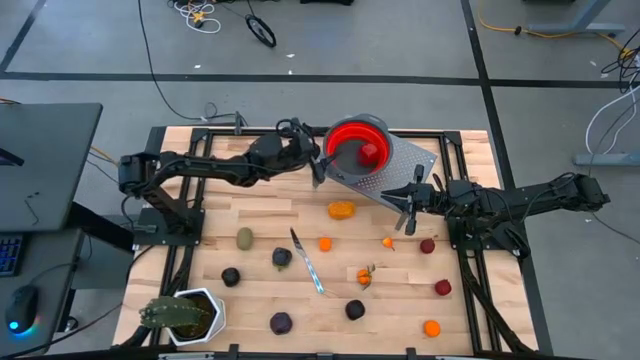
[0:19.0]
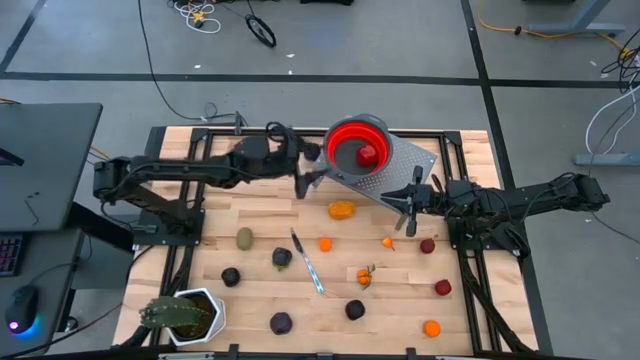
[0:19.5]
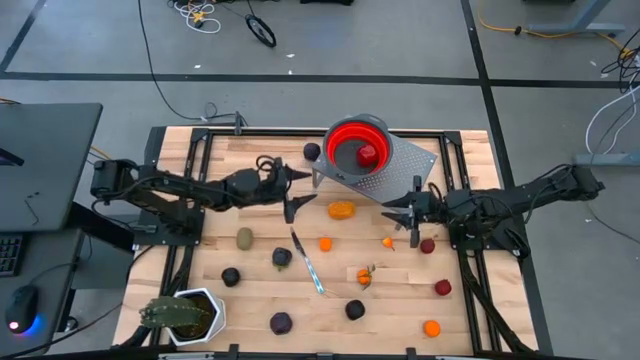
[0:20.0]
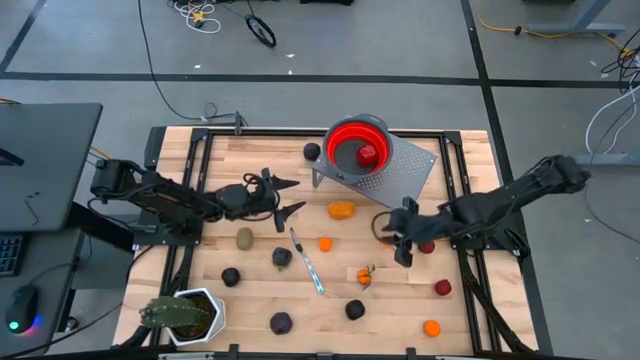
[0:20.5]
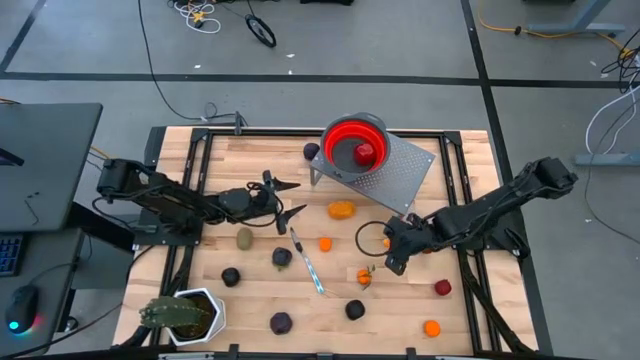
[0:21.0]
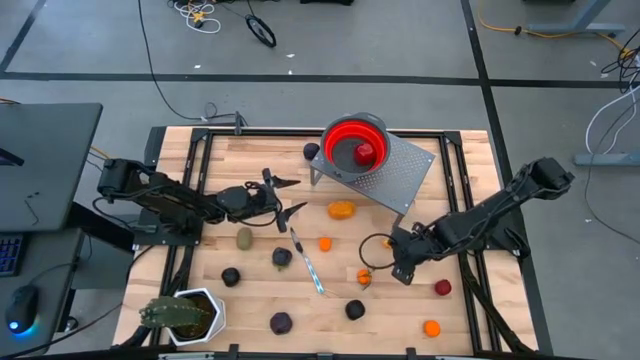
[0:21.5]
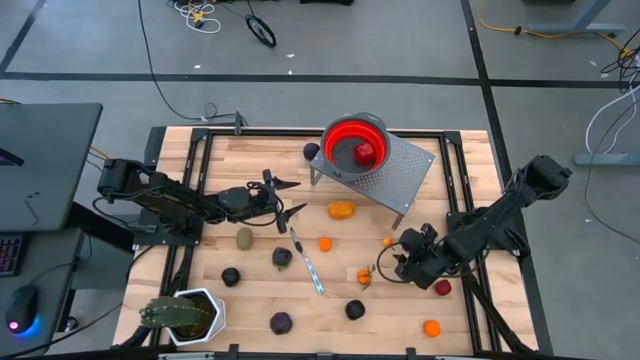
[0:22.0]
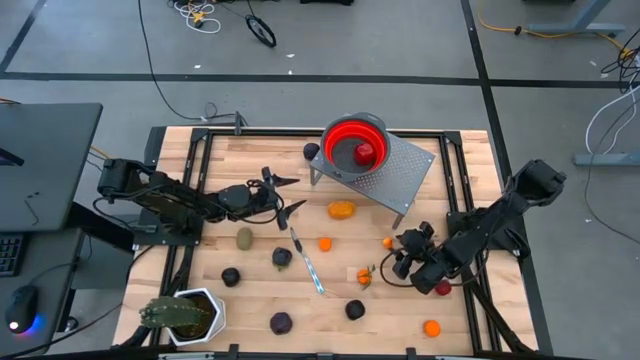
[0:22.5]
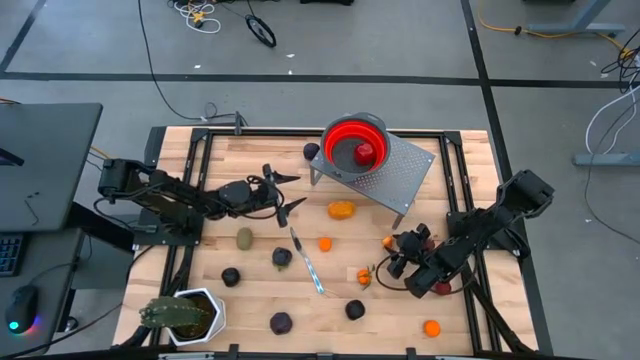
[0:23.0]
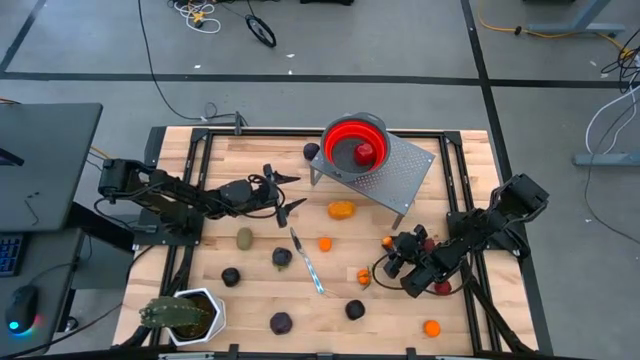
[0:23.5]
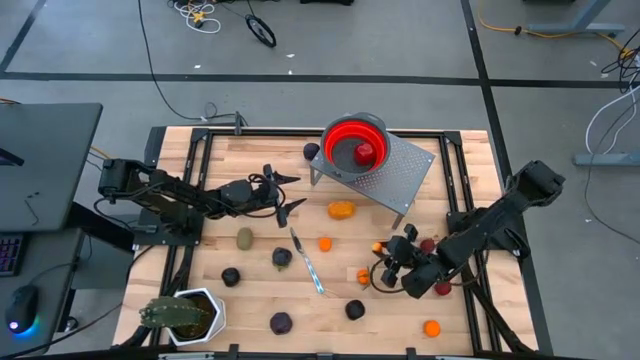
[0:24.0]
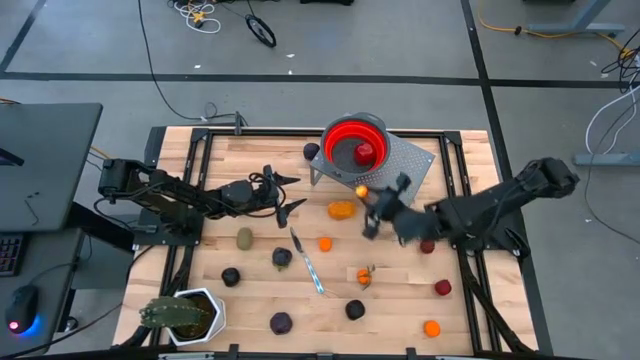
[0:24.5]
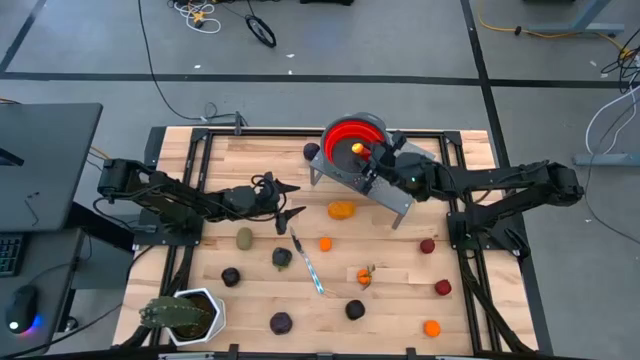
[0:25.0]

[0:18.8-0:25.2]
Task: Pick & Place Fruit
Put the peach into the red strainer bowl

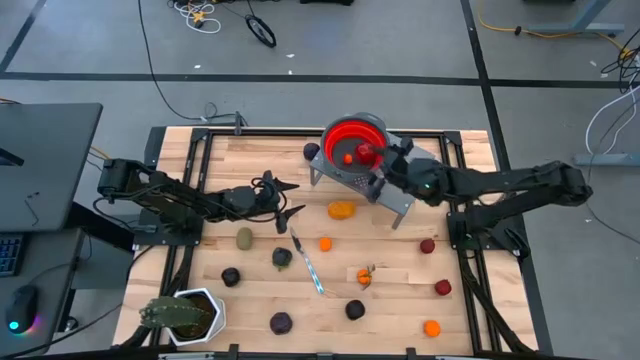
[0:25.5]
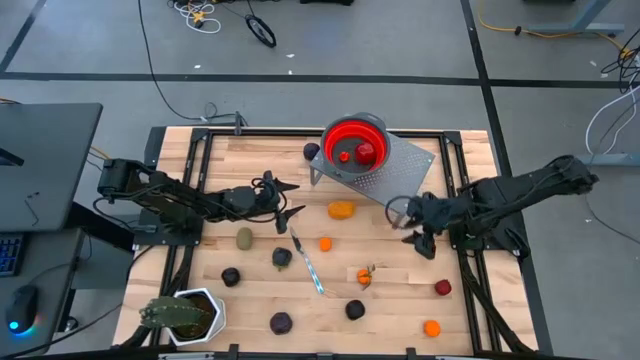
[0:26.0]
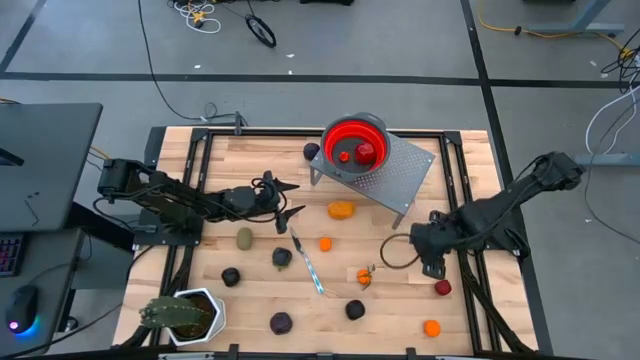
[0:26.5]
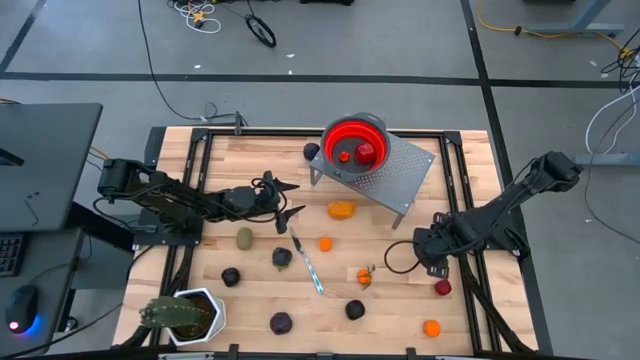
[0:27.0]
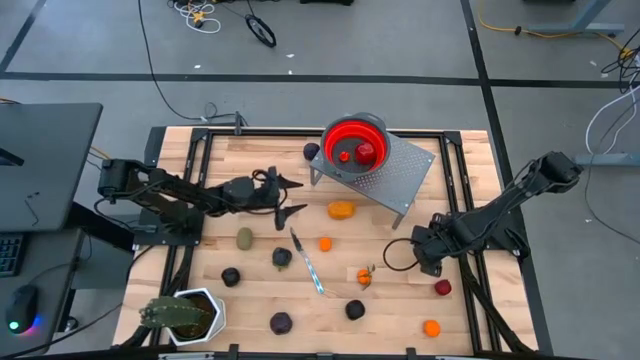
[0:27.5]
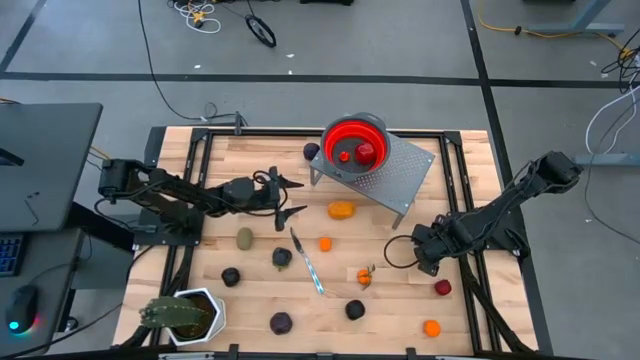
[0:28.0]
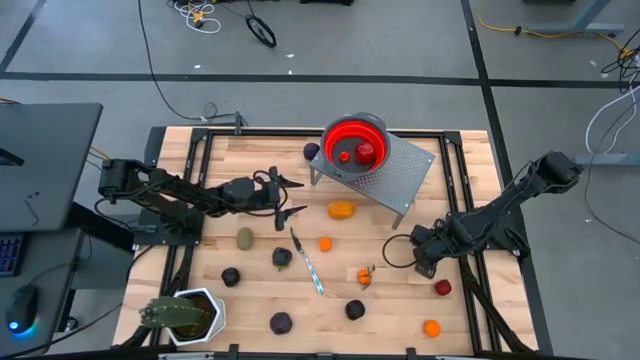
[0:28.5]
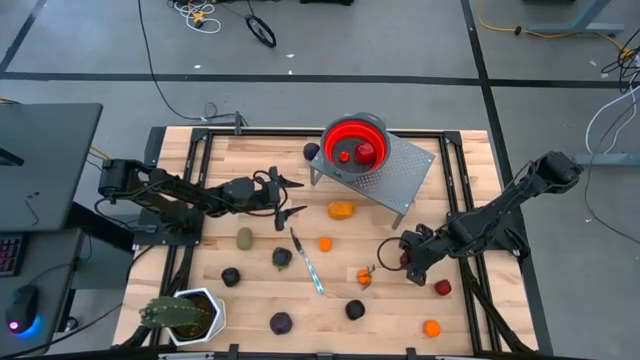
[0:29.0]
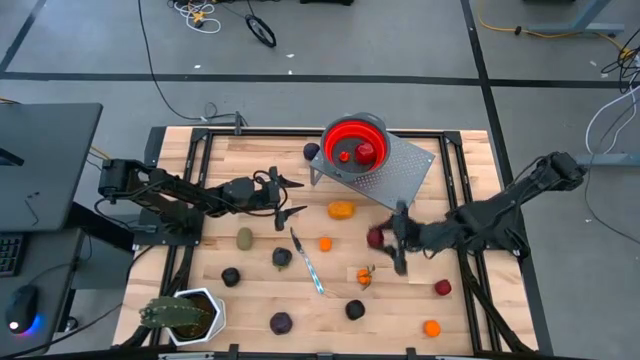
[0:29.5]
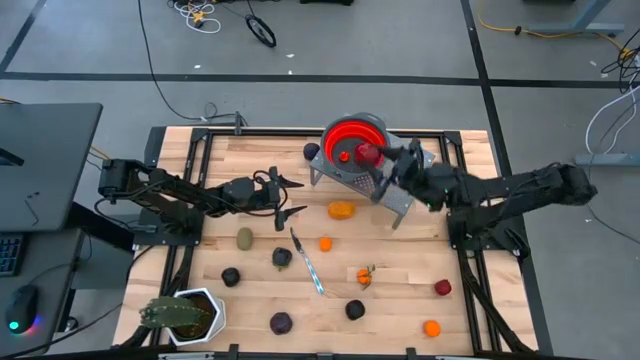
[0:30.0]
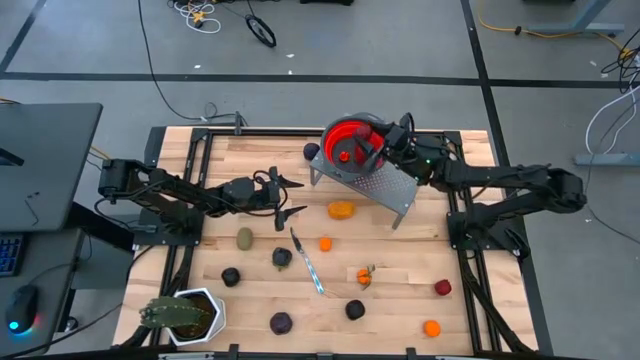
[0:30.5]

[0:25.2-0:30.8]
Put the top pomegranate into the red strainer bowl

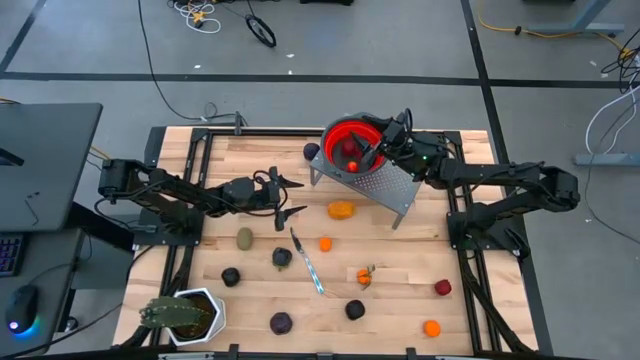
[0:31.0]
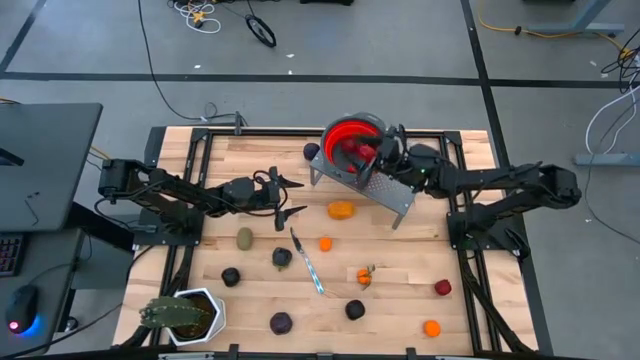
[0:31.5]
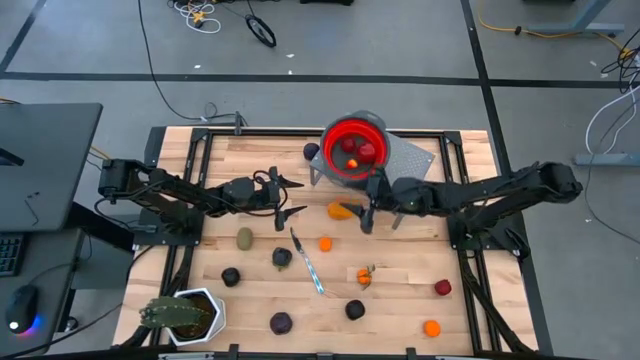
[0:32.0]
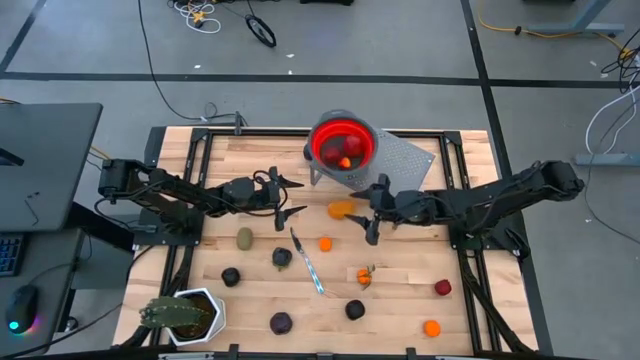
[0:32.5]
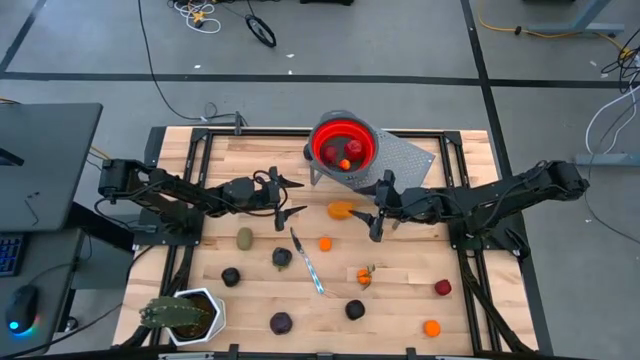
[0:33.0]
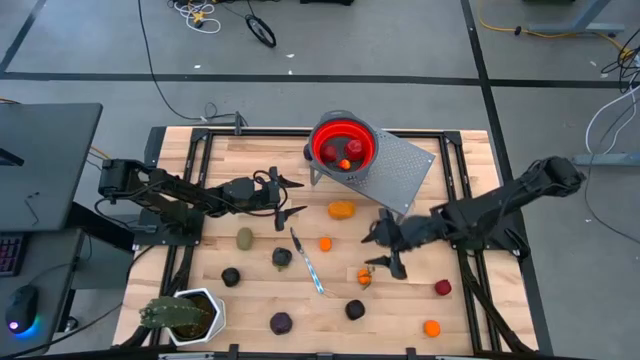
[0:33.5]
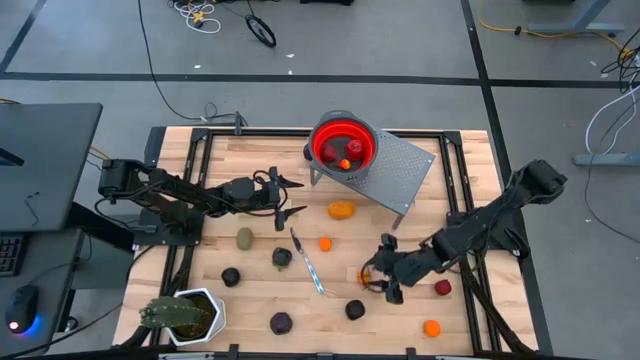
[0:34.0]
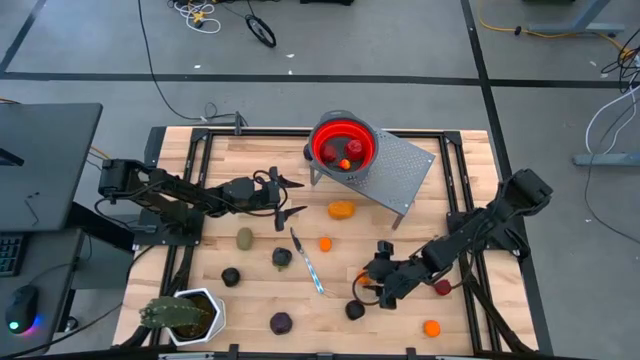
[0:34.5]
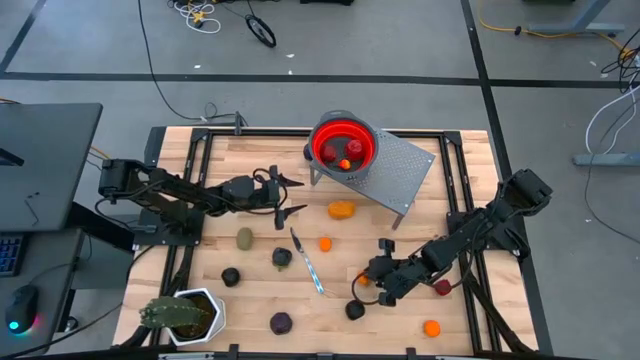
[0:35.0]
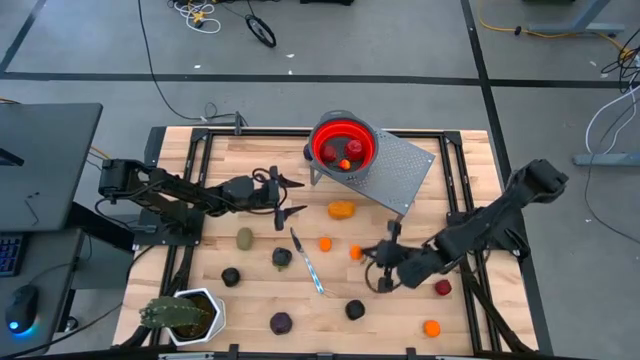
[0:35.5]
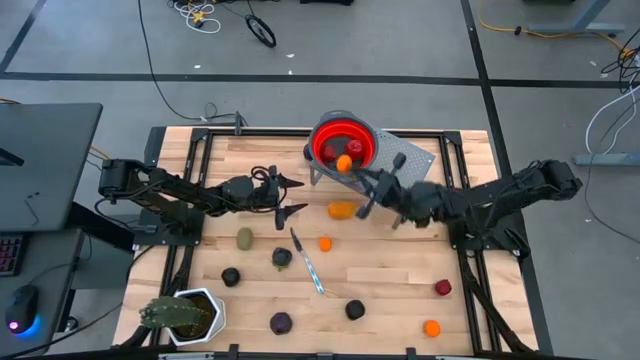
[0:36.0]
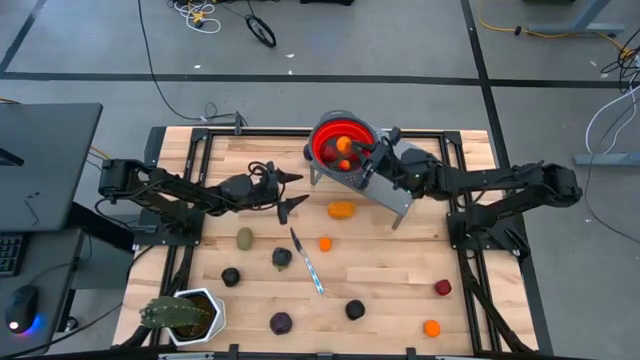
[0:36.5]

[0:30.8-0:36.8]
Put the middle orange into the red strainer bowl

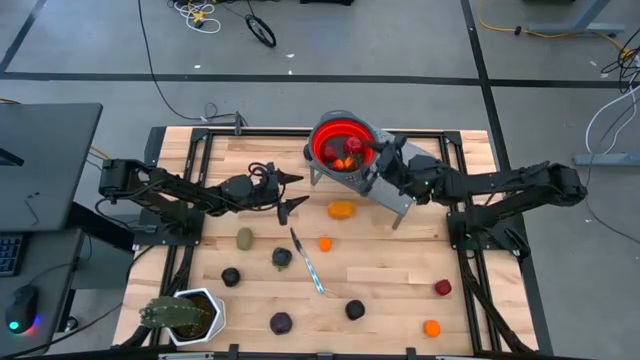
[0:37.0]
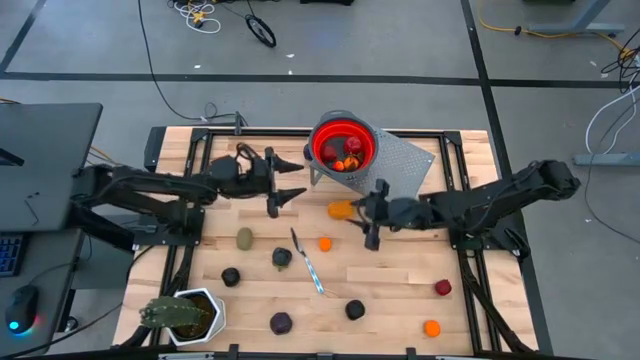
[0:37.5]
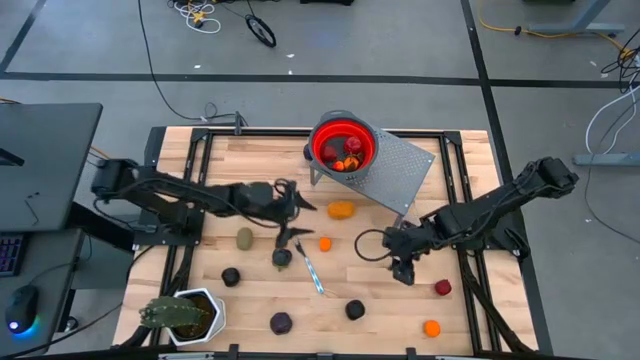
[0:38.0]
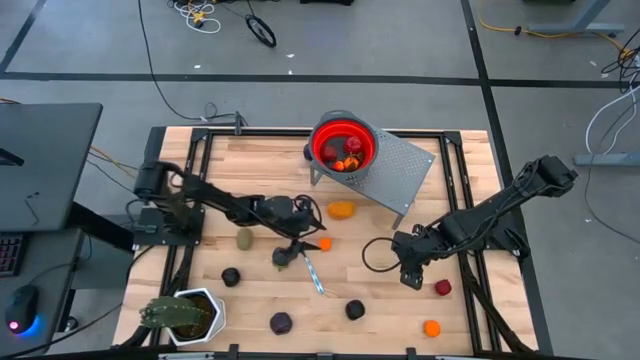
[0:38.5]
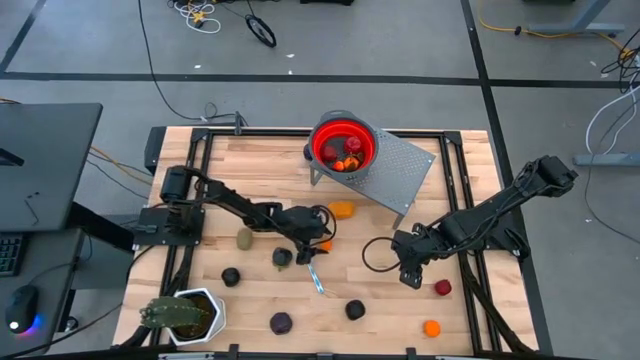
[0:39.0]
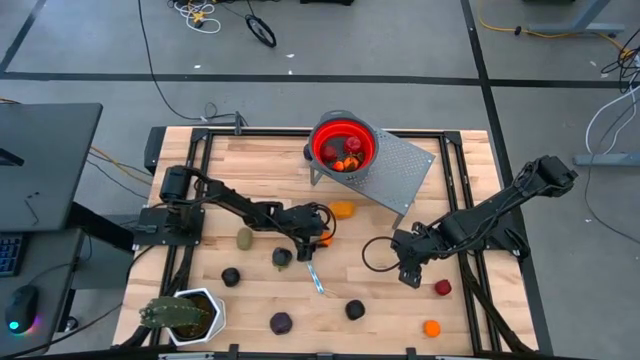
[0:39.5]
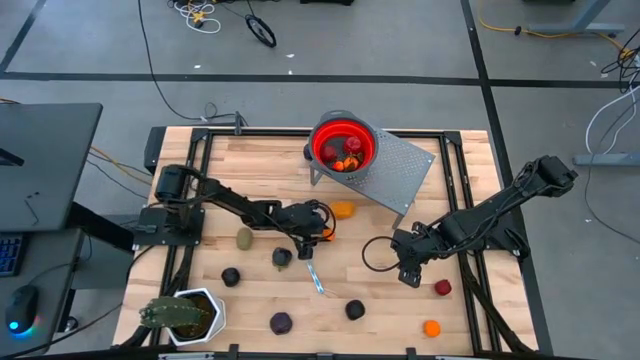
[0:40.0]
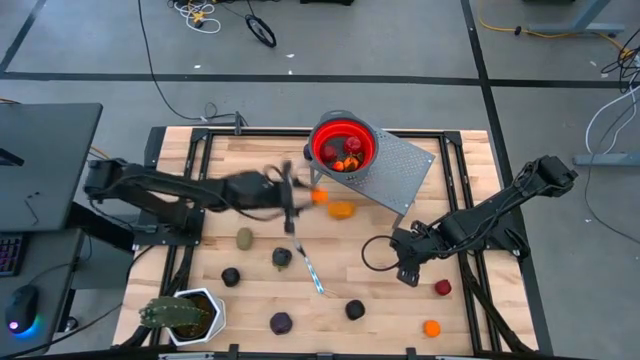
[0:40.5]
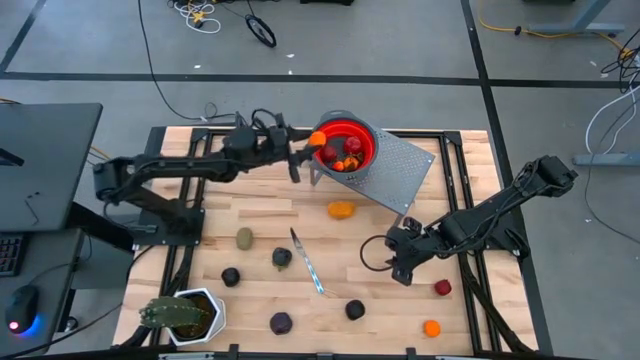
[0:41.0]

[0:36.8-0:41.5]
Put the top orange into the red strainer bowl
